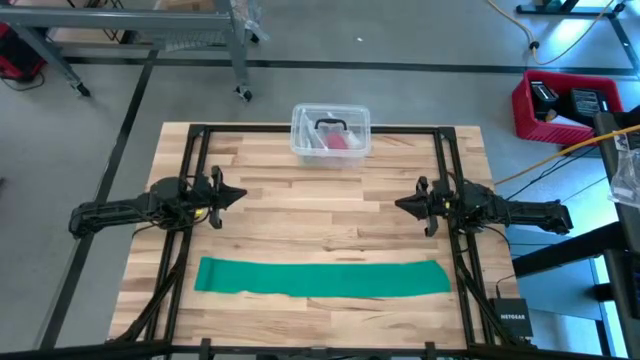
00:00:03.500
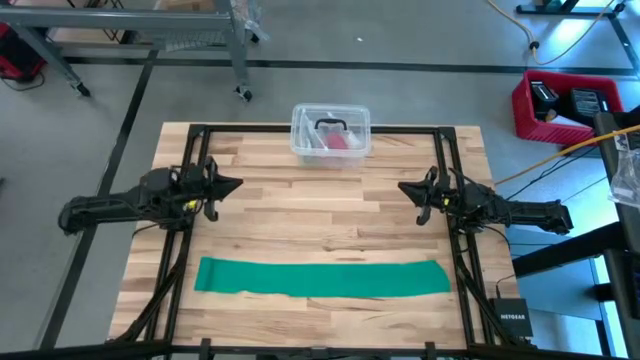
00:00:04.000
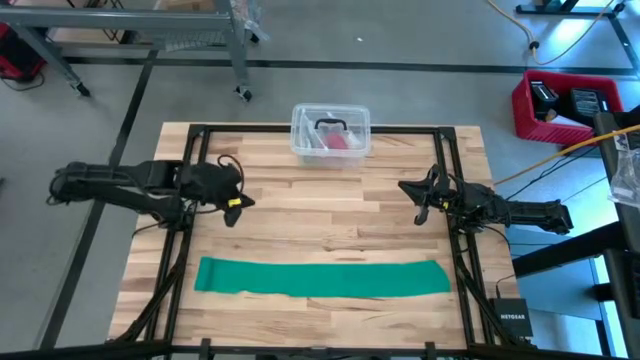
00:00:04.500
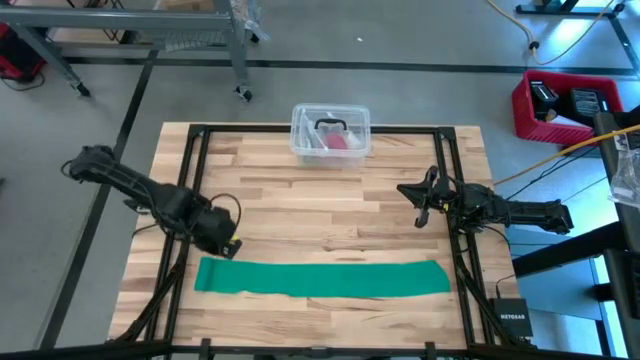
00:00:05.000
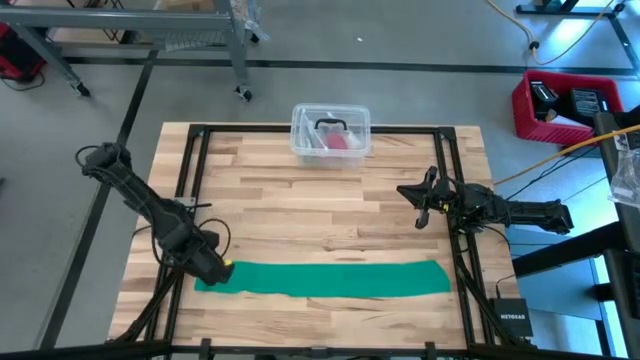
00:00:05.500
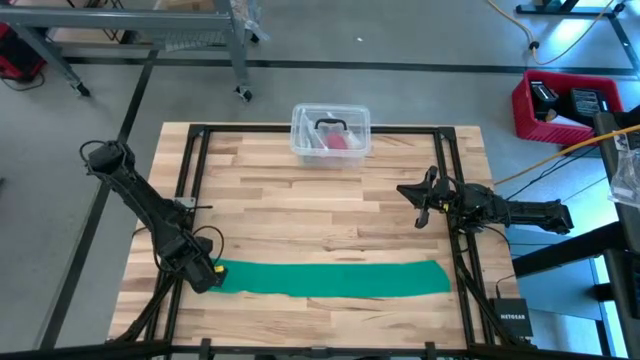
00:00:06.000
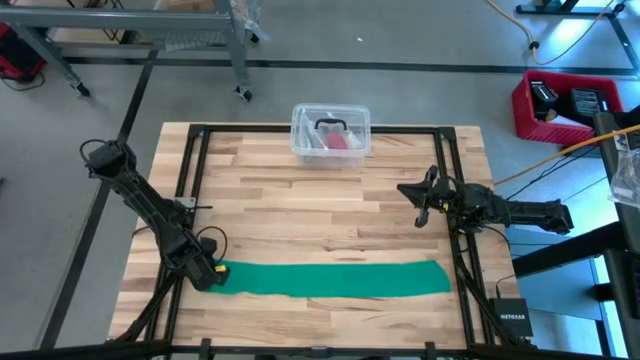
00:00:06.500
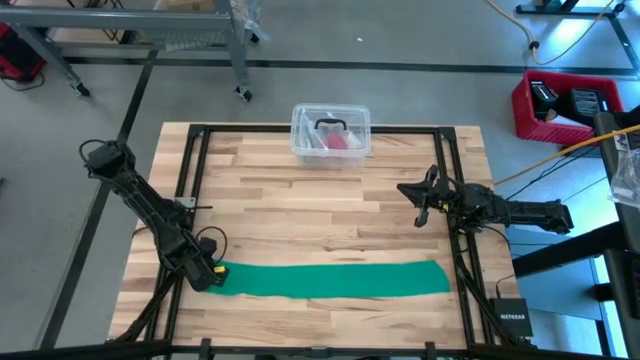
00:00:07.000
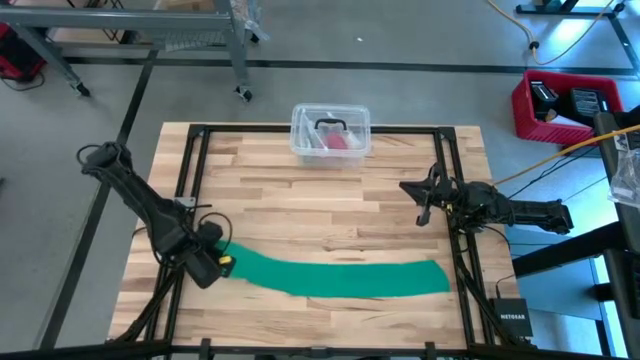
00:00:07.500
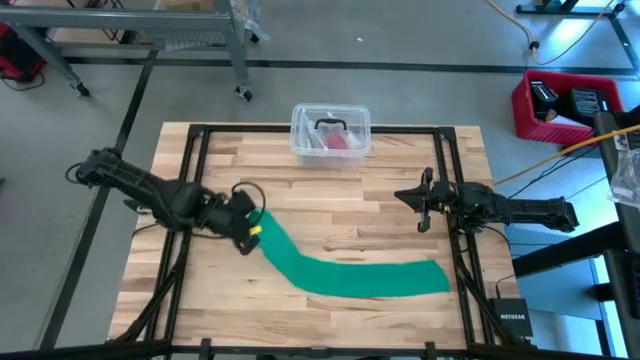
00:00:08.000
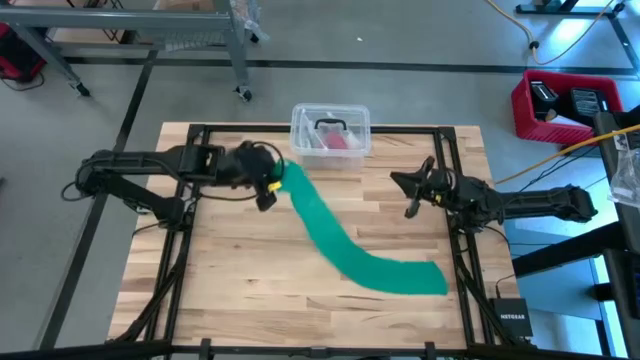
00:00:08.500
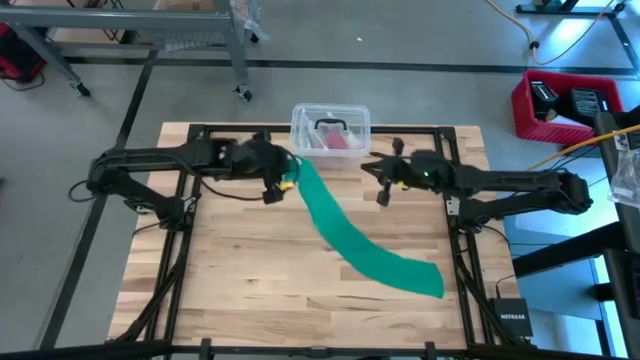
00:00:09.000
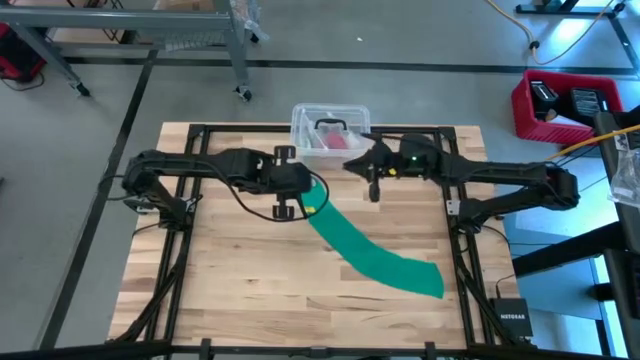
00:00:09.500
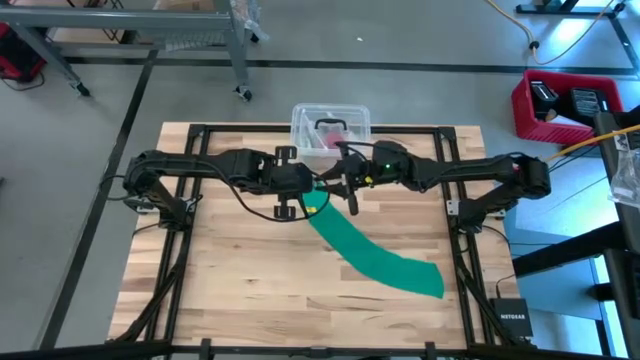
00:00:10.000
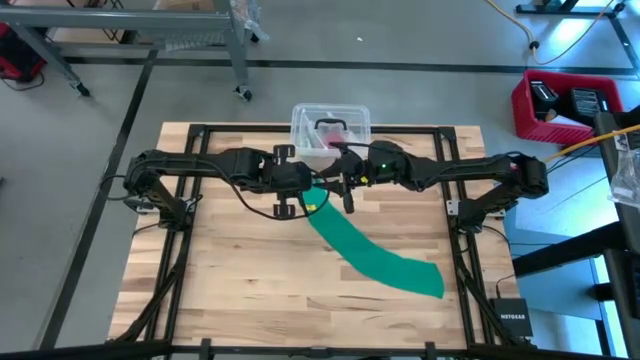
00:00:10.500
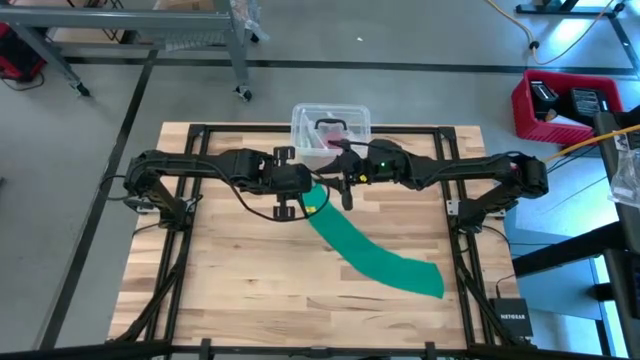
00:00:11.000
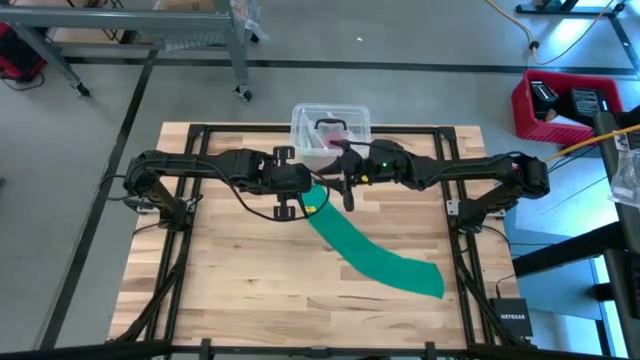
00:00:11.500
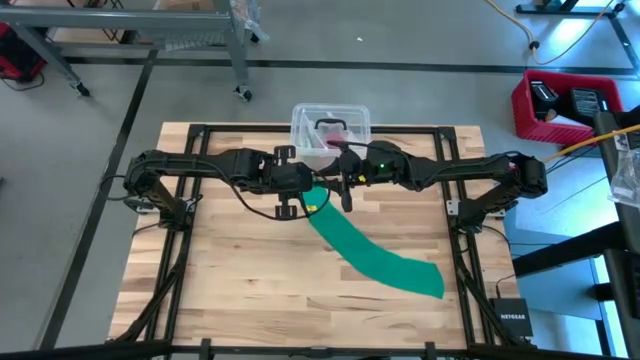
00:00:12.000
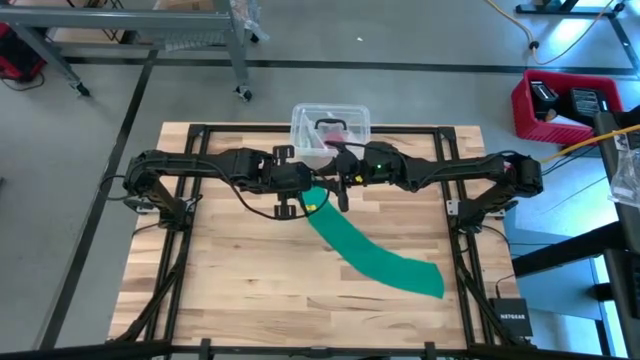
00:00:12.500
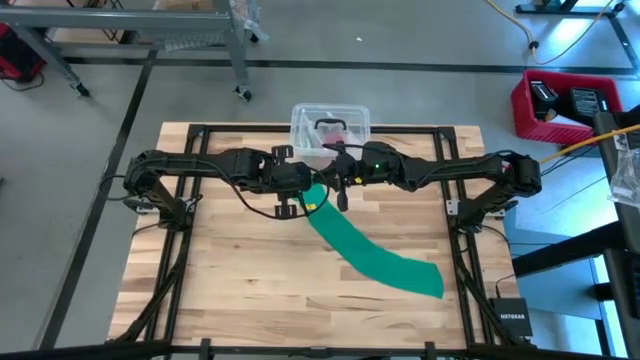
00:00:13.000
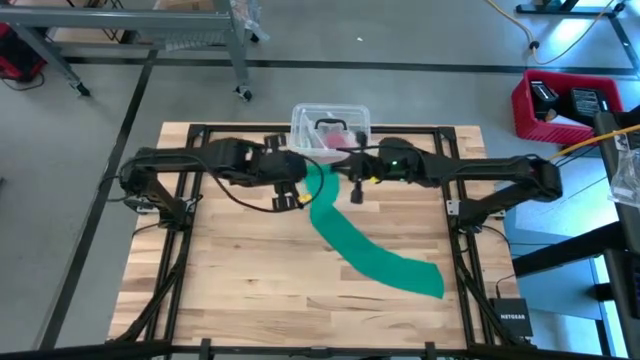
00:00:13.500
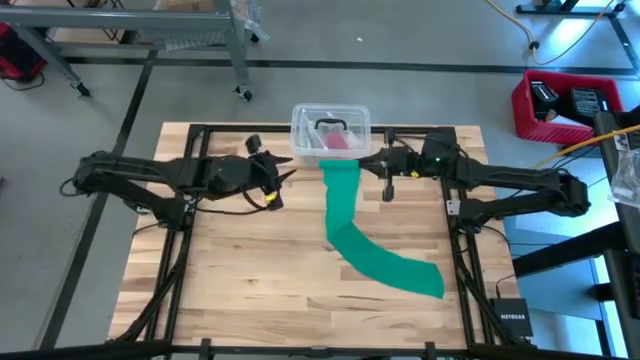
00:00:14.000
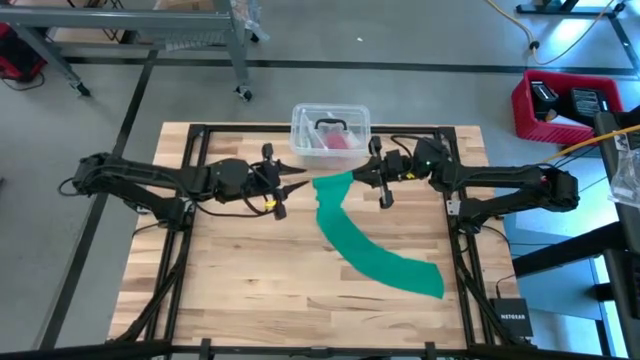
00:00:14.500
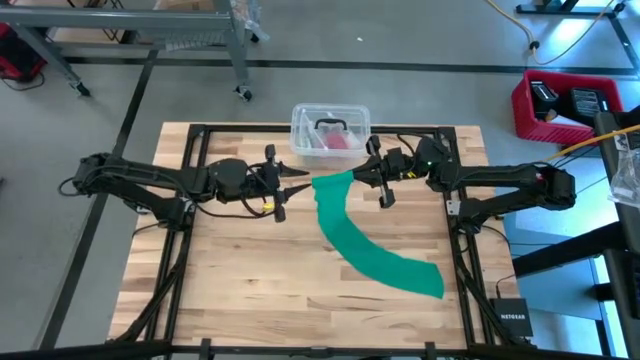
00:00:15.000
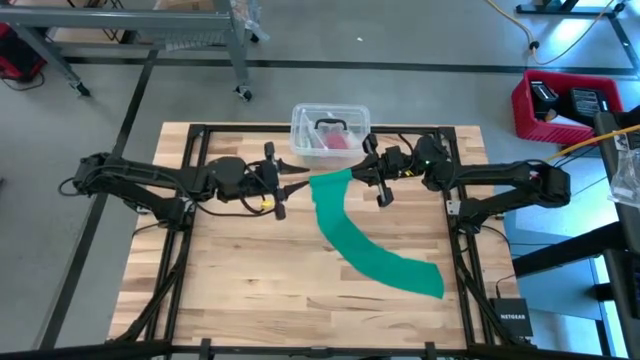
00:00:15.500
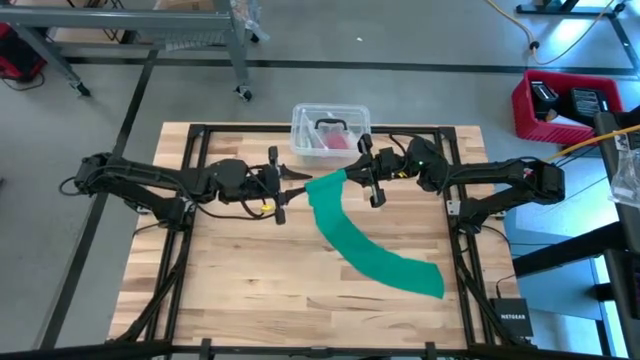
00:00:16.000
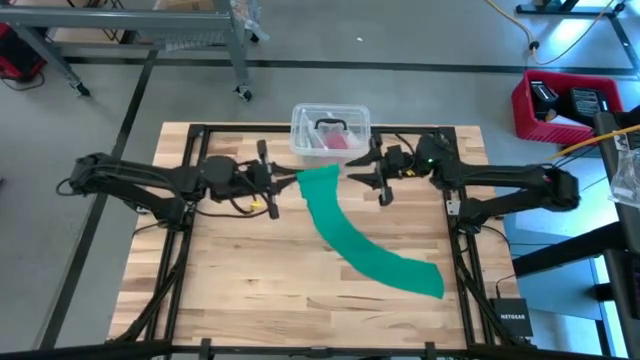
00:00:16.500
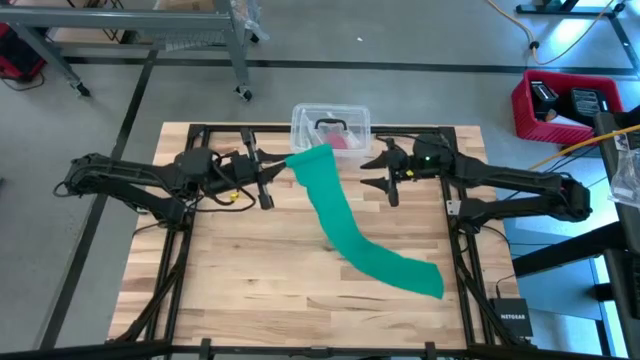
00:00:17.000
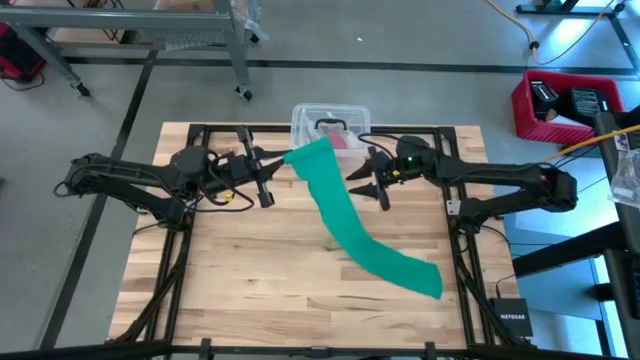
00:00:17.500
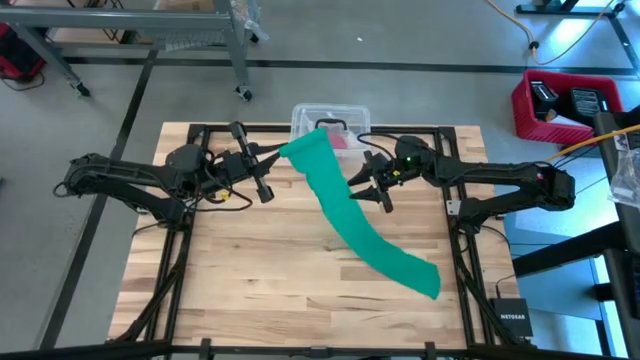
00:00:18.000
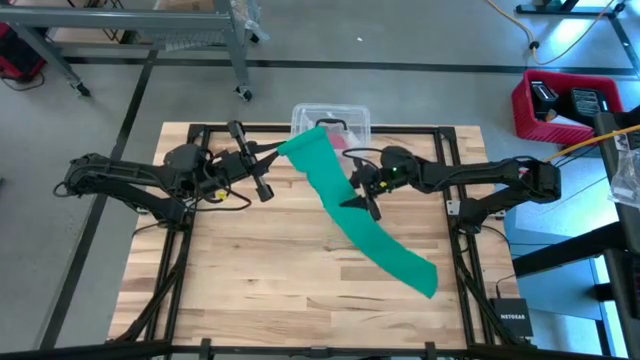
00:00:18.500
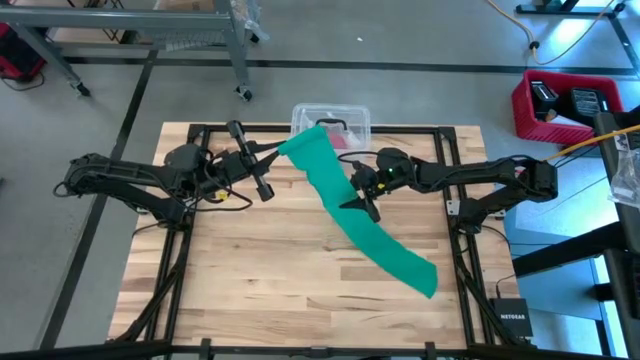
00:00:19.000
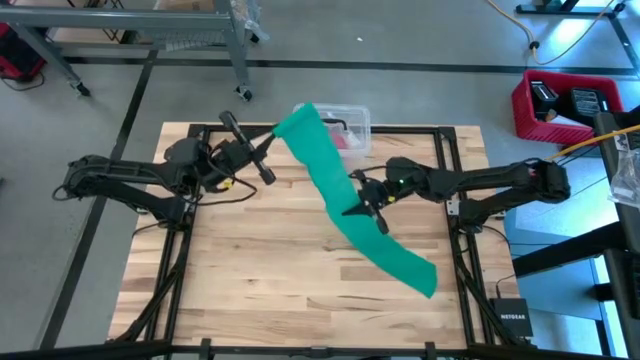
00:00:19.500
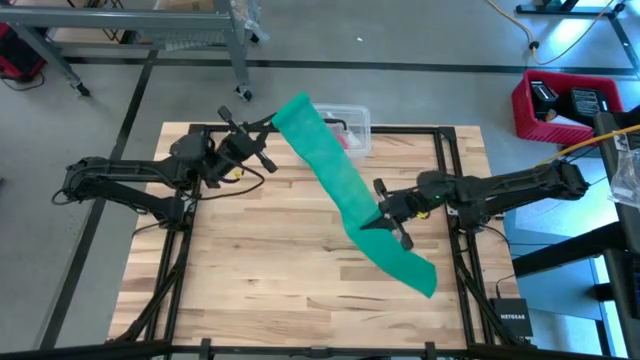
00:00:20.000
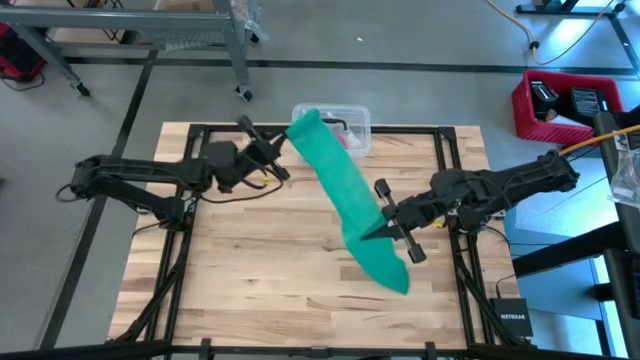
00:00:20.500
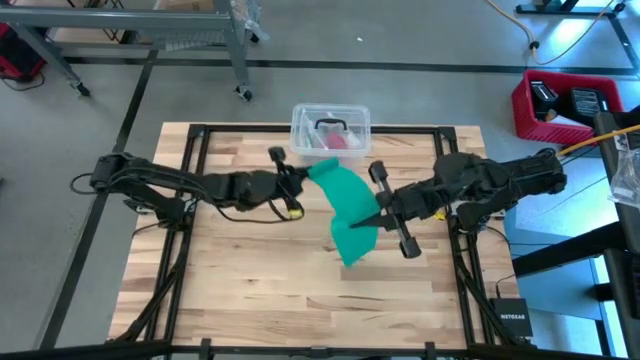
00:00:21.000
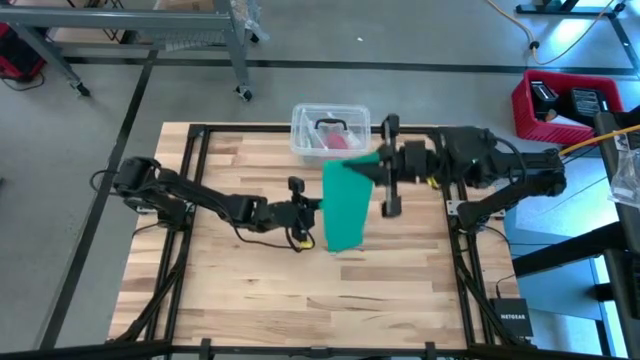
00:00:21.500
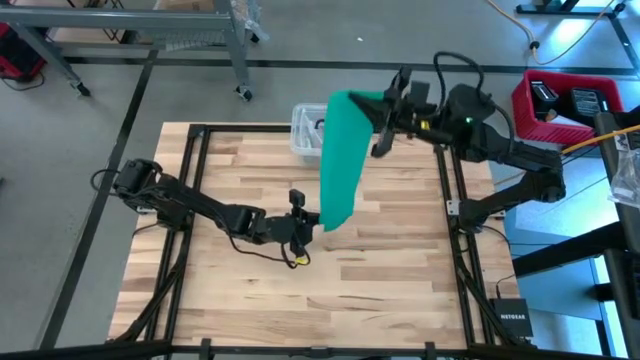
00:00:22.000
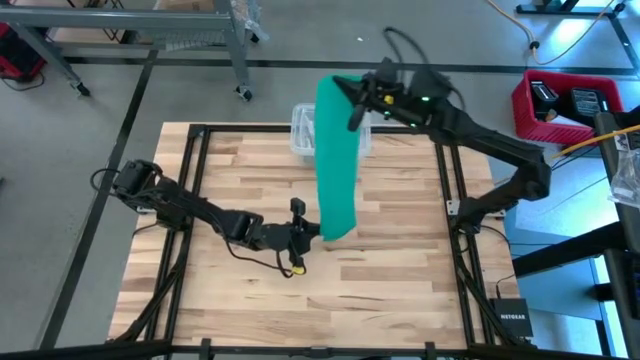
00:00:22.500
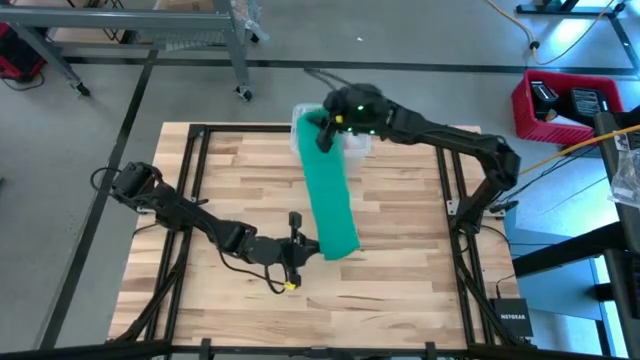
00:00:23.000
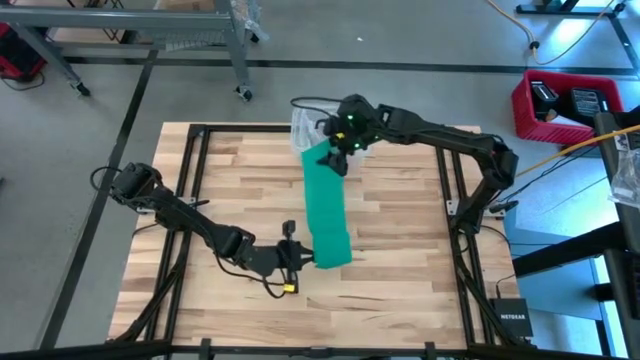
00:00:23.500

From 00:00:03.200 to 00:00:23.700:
Task: Roll bandage
Roll the green bandage
